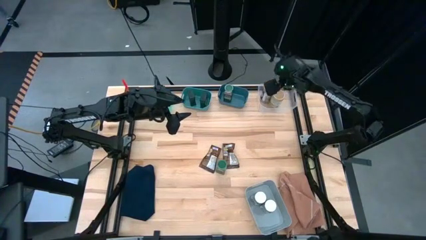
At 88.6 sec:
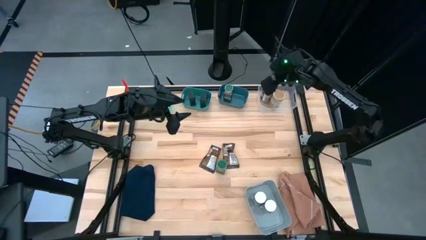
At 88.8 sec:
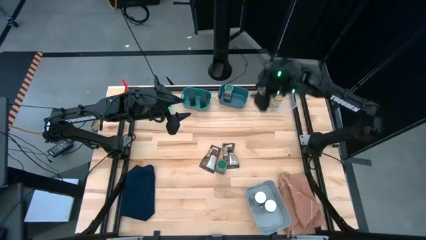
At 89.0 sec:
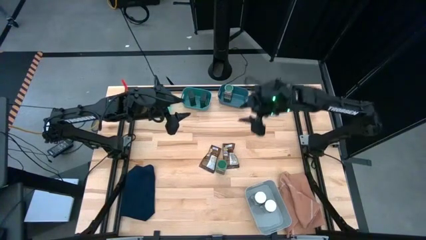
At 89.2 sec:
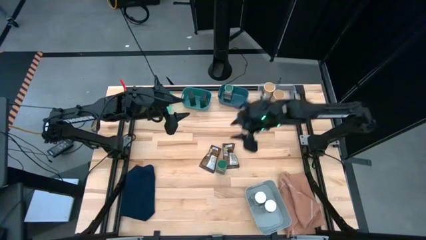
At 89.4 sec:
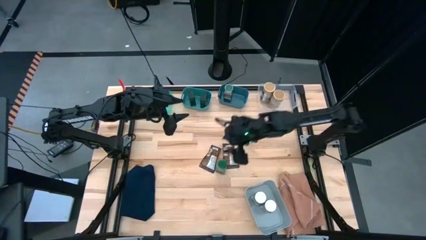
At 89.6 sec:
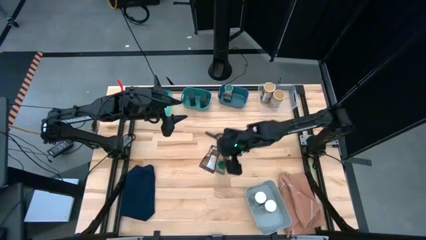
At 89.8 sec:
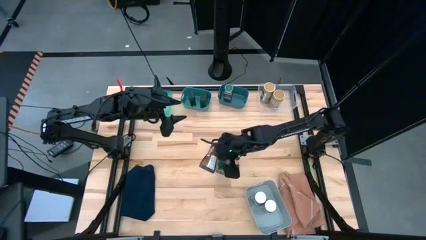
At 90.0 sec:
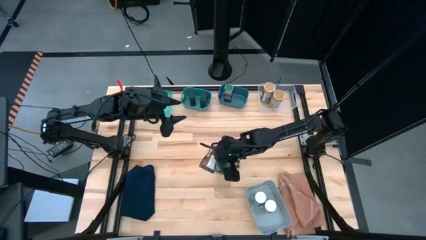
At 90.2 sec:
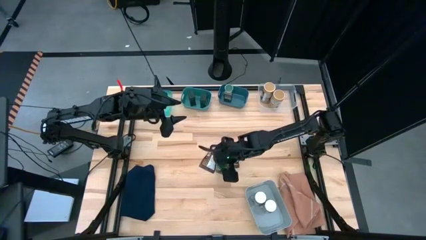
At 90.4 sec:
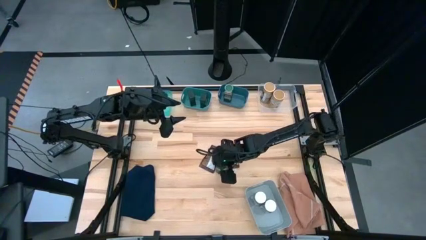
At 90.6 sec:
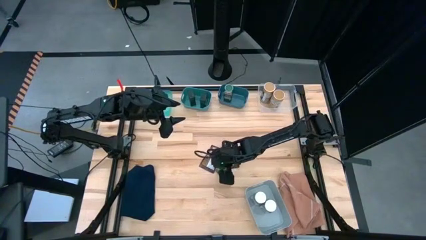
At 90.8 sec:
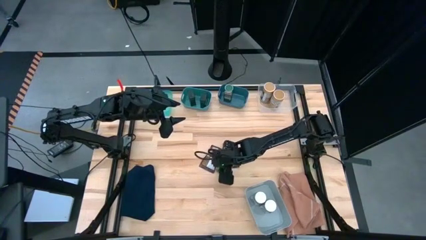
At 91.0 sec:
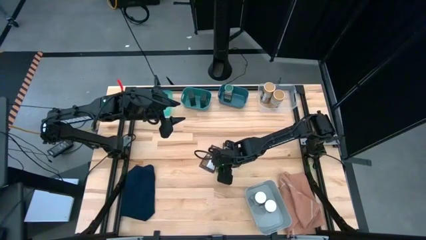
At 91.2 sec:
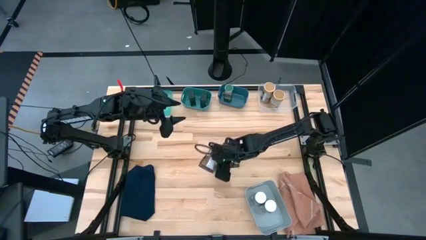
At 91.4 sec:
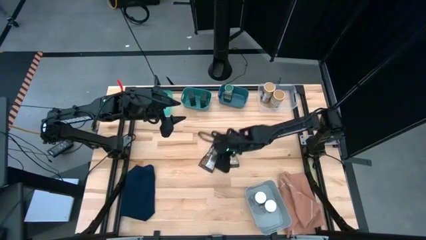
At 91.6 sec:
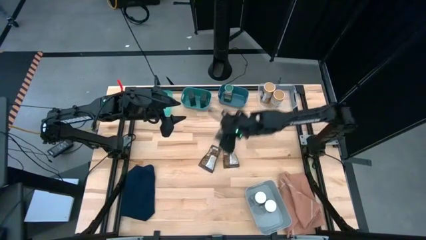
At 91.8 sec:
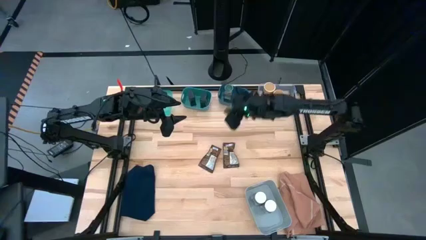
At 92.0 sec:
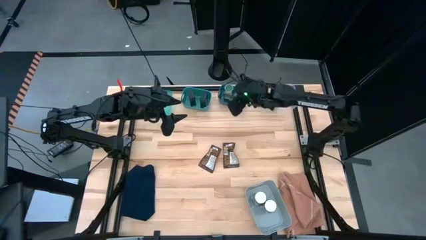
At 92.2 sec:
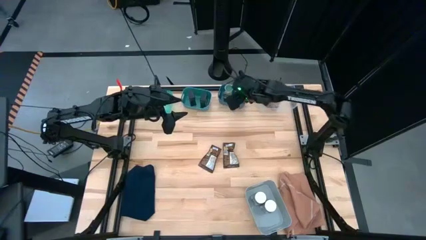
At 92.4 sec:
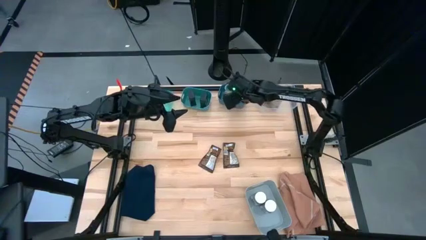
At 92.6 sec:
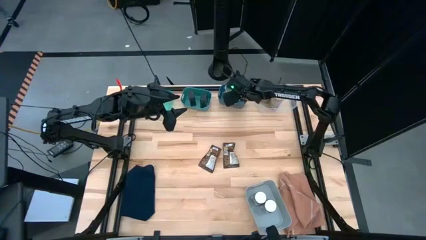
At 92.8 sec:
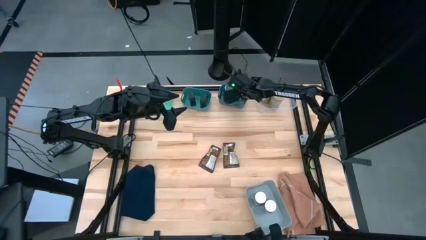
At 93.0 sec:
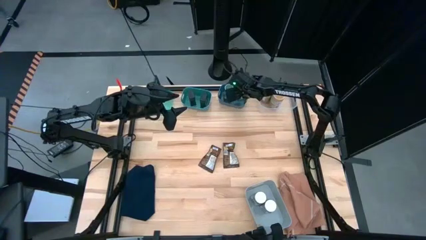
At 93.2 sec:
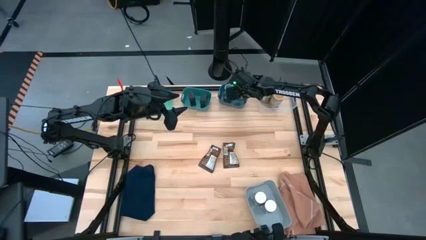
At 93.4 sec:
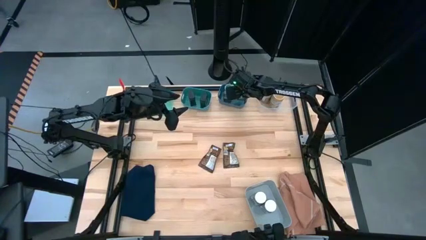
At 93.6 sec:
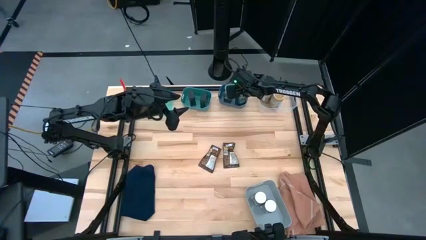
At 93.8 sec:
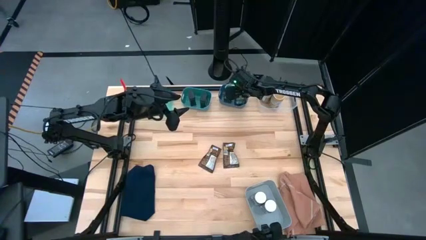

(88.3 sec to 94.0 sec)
Task: Sort spices by type
Put the green seasoning bottle into the blue bin

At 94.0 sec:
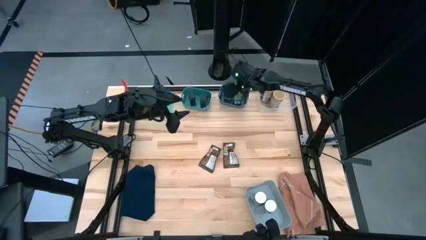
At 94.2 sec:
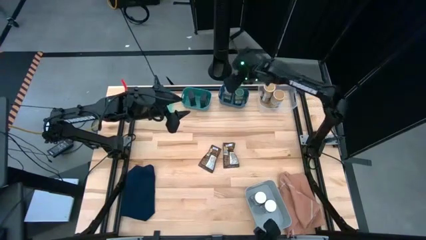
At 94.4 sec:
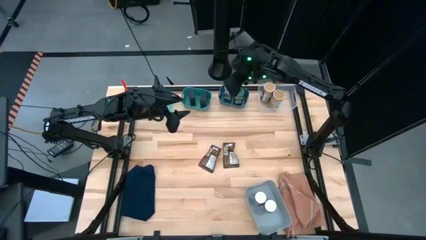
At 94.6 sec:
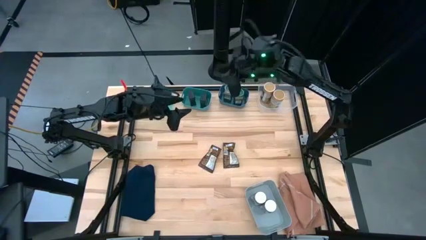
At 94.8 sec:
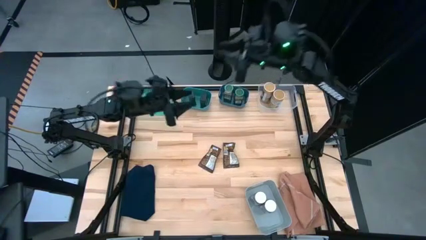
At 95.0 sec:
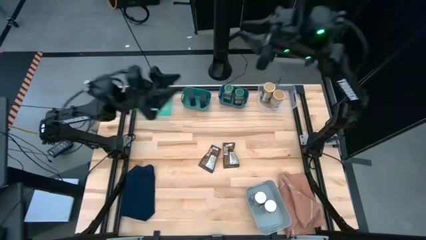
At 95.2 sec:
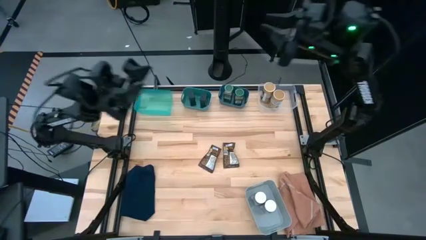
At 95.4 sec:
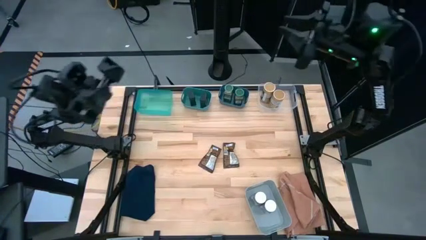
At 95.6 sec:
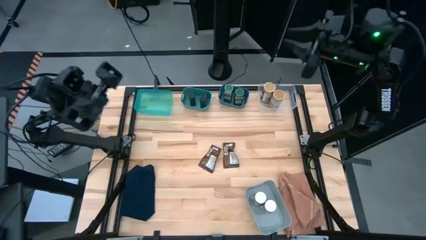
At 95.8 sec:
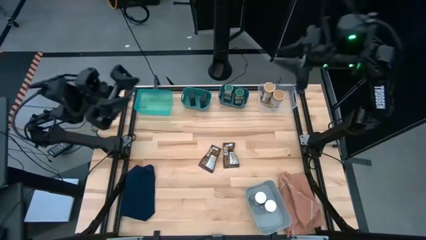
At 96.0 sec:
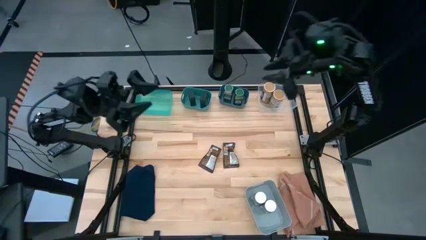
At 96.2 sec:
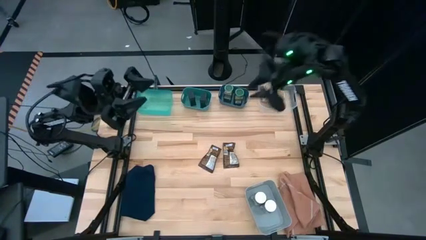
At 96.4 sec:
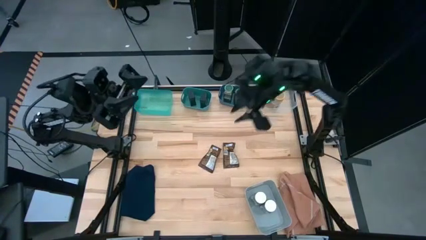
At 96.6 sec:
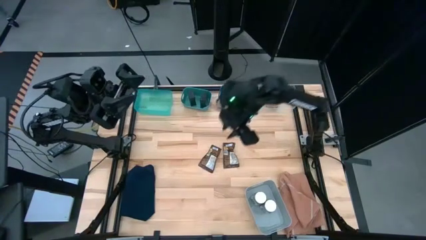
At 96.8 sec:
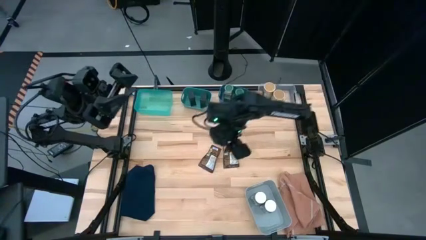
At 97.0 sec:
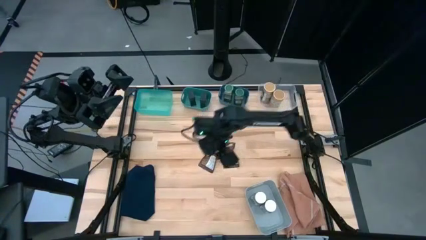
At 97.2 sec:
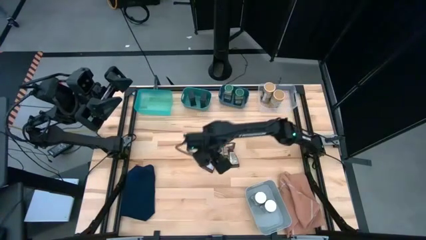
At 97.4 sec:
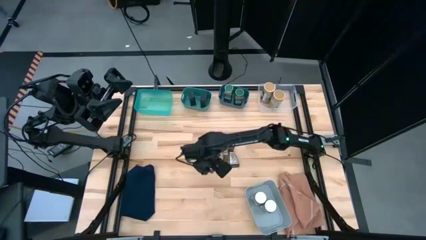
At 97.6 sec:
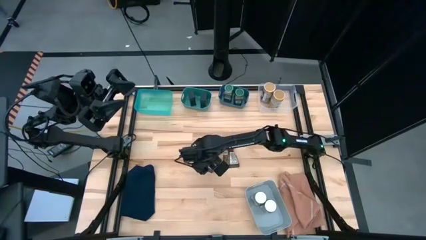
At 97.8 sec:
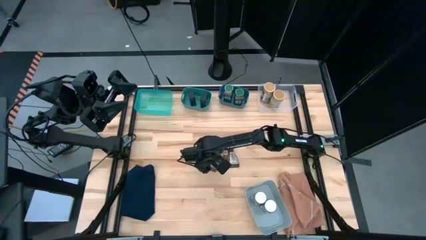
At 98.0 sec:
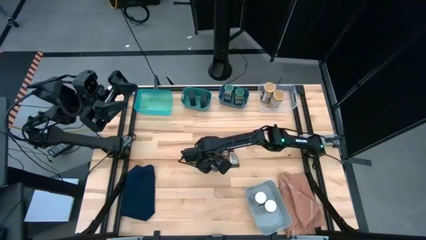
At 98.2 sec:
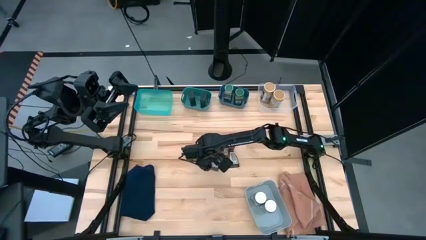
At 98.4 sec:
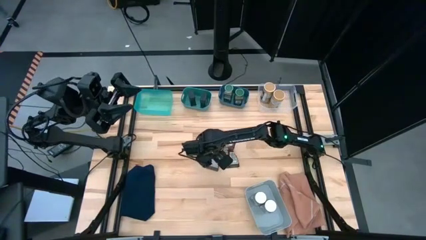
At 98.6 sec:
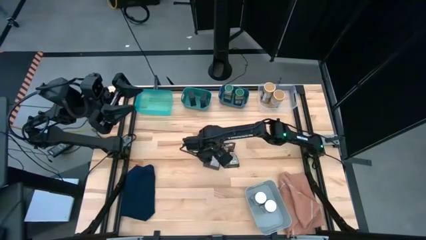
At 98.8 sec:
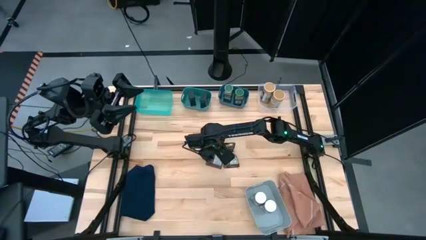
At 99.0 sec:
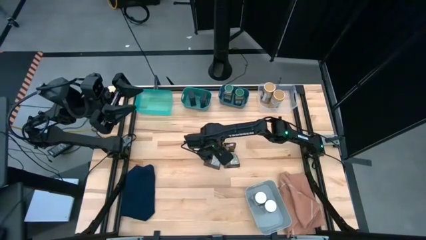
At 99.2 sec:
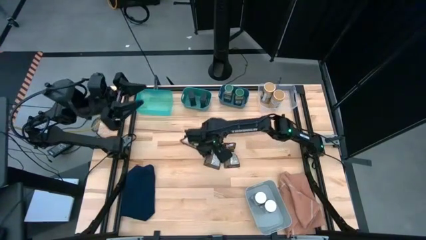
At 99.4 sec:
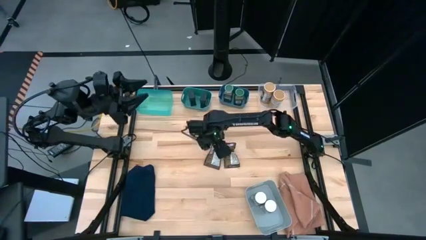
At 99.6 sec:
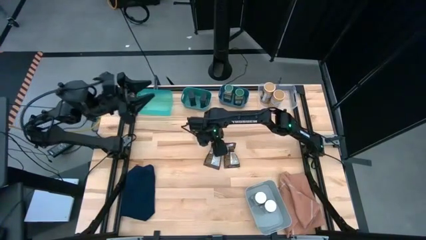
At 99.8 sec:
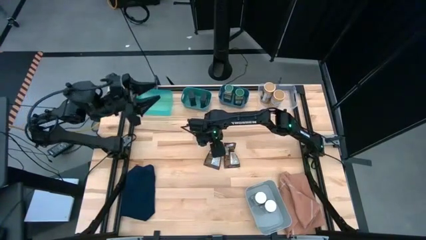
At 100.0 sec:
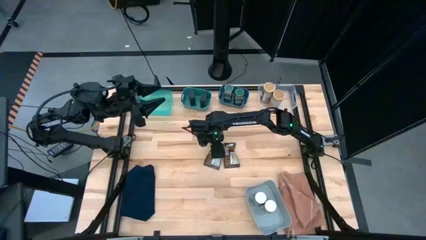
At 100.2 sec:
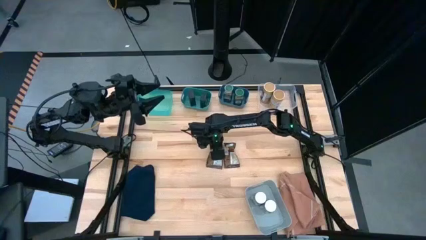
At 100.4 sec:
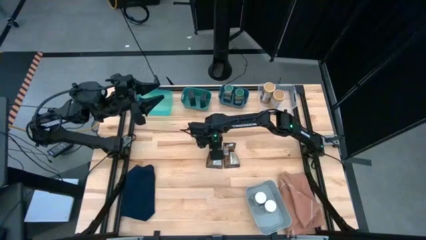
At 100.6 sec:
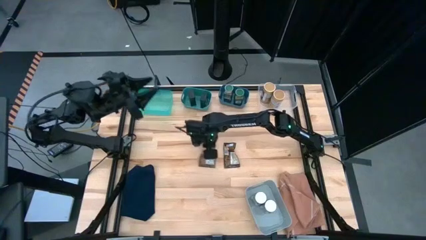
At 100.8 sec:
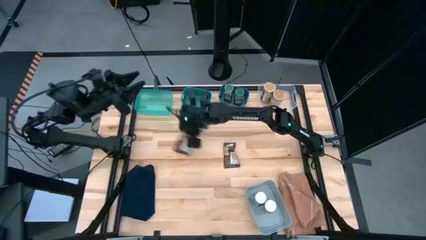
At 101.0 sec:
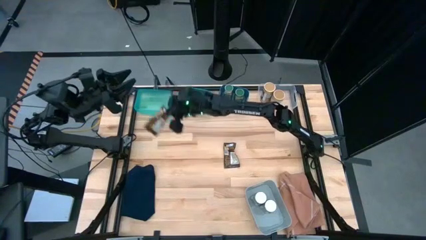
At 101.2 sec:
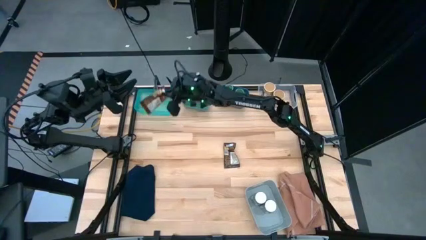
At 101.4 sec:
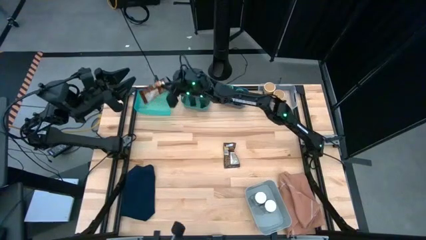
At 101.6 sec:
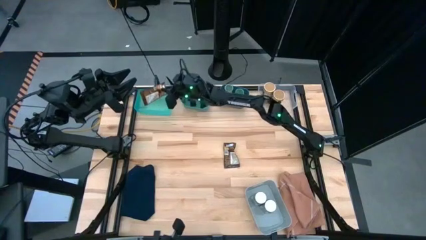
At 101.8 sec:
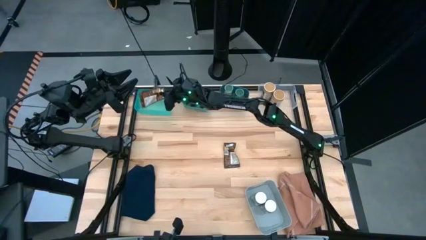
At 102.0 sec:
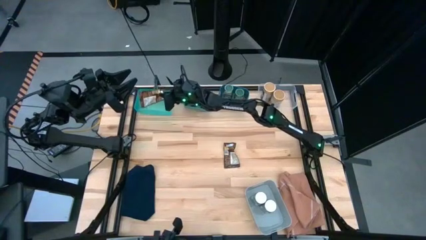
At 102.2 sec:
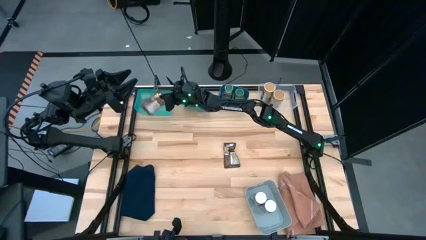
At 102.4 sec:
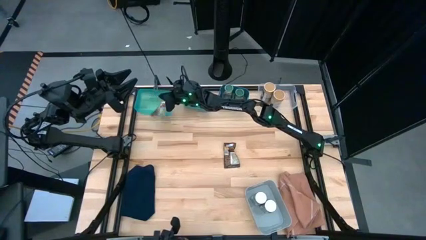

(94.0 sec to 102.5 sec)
Put the left brown seasoning pack into the light green bin

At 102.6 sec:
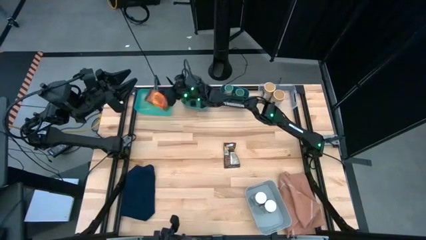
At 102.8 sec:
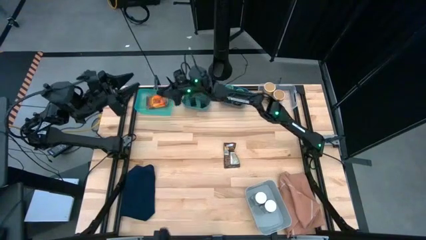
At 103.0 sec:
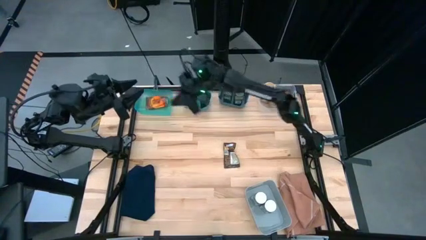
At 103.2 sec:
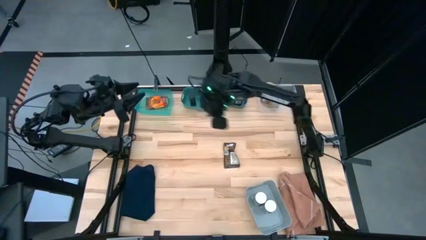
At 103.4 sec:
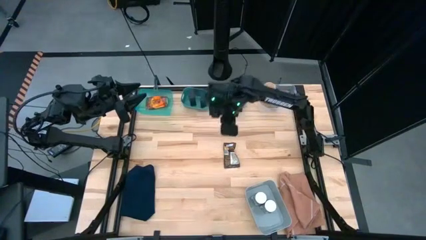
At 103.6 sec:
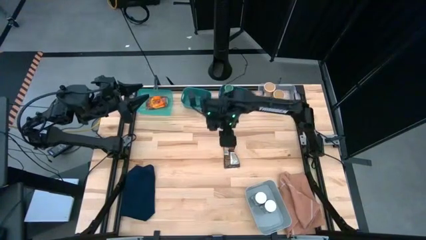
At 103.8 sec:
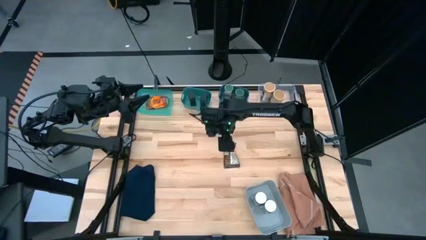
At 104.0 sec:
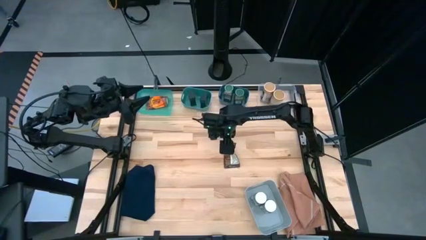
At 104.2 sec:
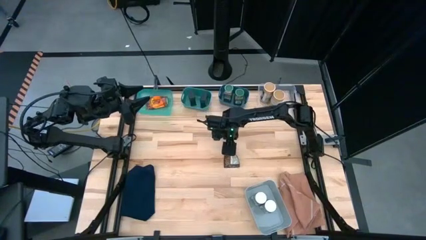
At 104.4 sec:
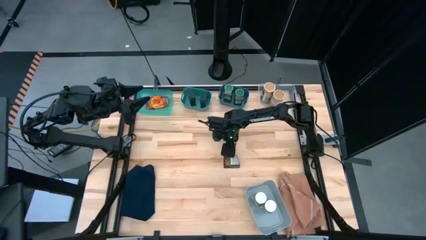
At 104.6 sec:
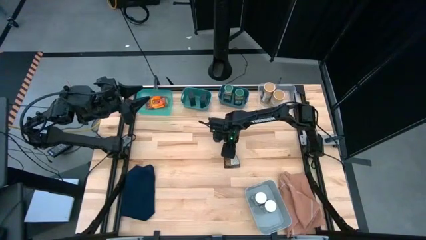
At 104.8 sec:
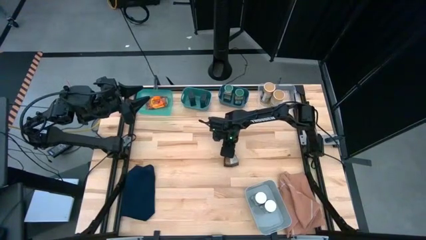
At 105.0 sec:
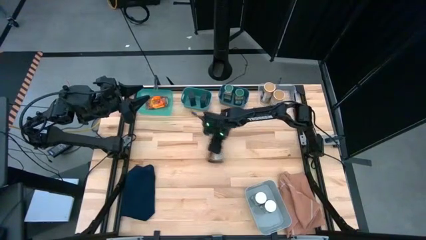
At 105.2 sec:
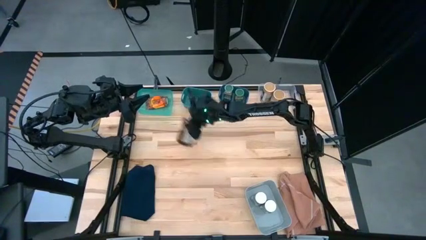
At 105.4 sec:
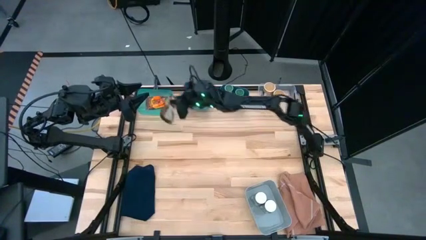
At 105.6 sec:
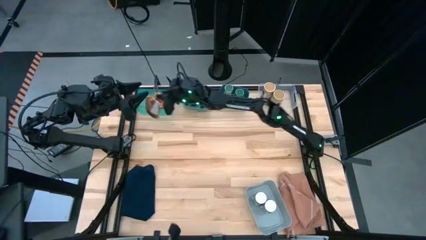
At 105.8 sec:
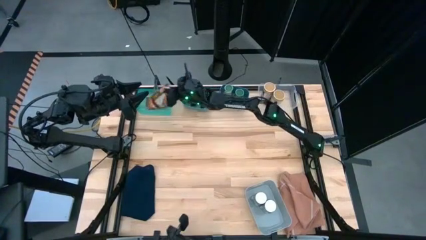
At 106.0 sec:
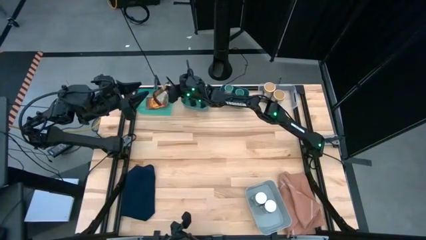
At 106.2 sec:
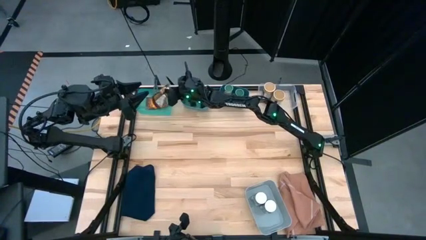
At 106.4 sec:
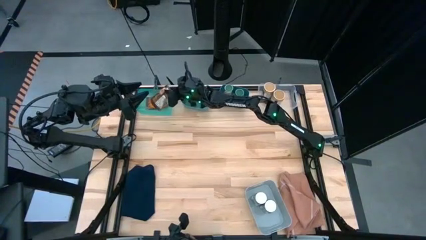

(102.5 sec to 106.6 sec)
Put the brown seasoning pack into the light green bin
